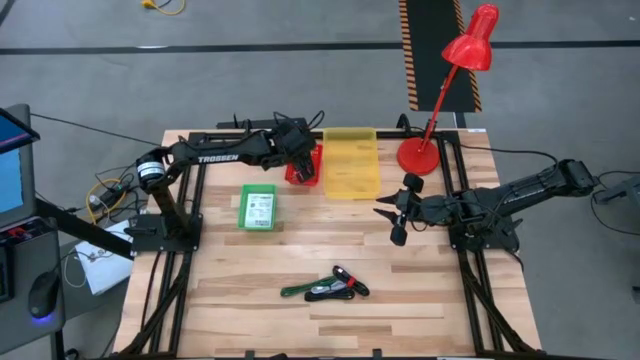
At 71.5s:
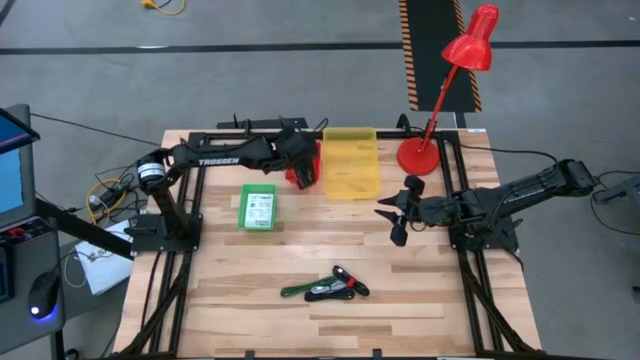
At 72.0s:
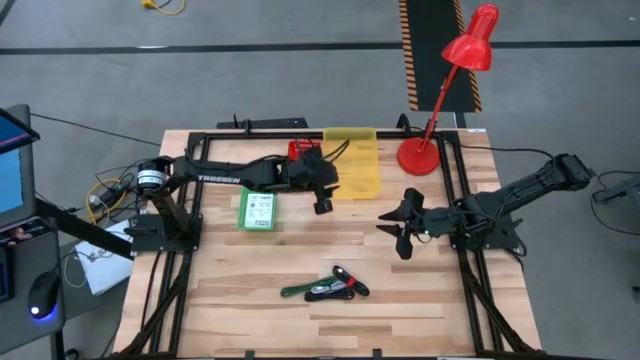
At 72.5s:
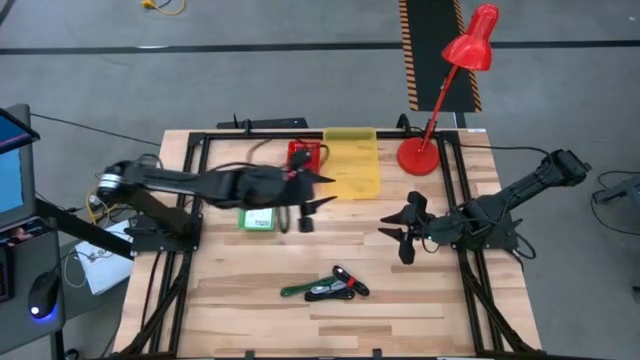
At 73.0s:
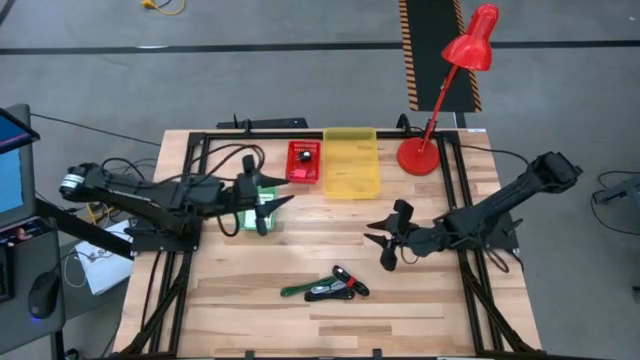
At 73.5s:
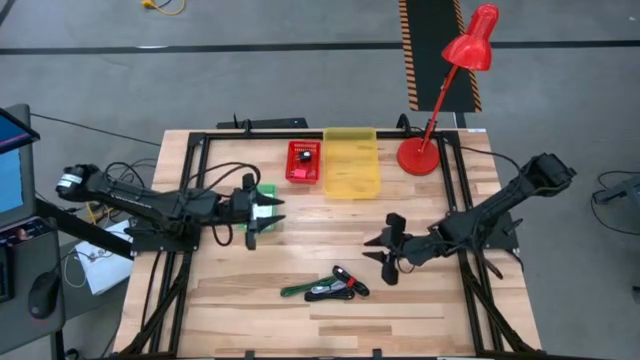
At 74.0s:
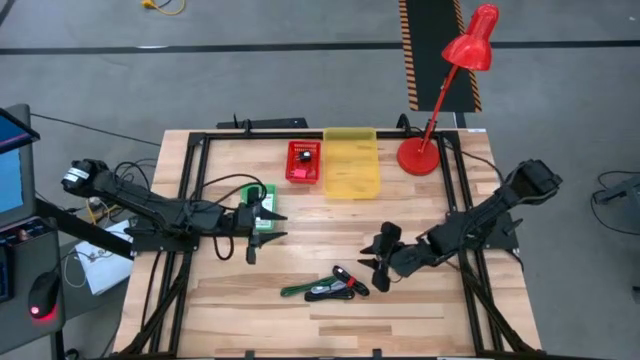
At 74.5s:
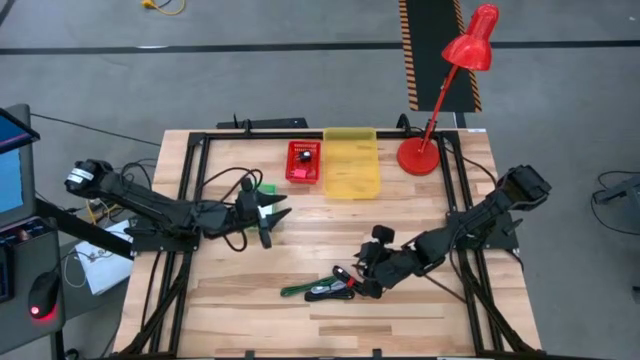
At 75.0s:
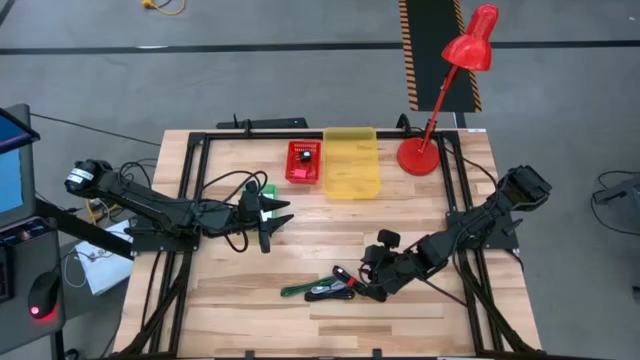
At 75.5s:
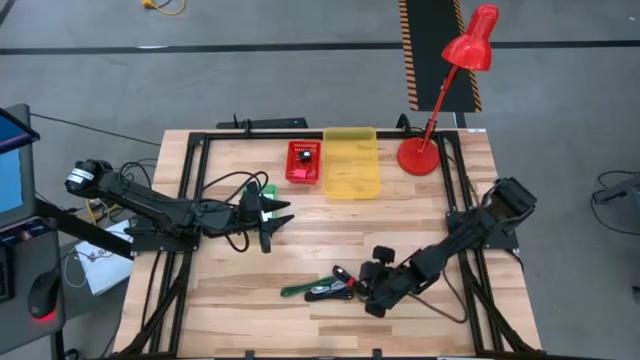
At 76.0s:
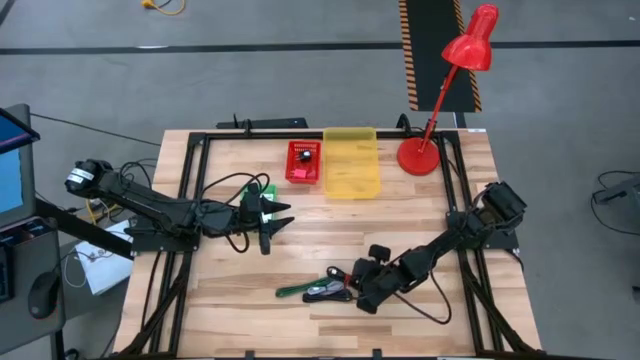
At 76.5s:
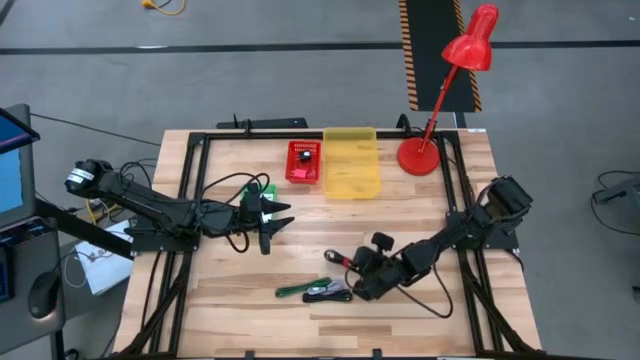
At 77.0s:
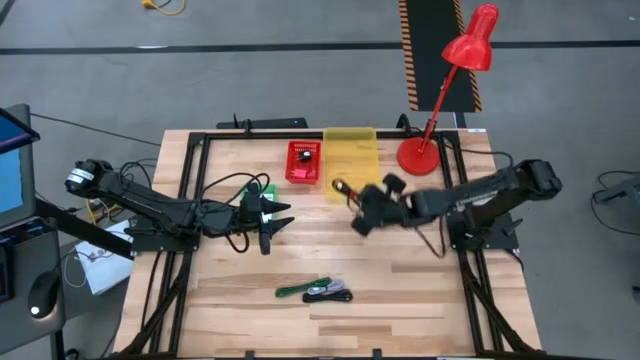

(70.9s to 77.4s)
Task: Pick and place items into bin
Put the top black charger cable into the yellow bin

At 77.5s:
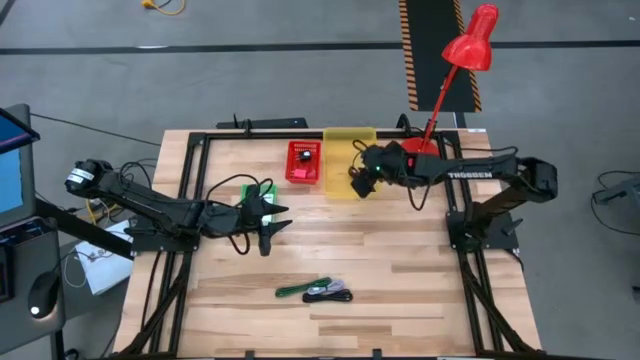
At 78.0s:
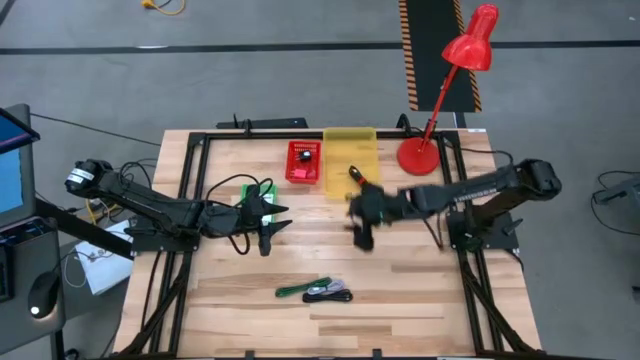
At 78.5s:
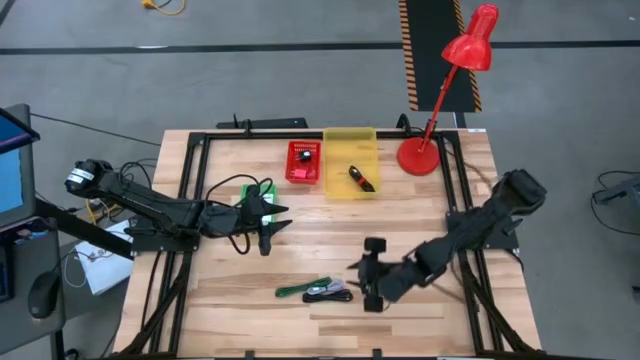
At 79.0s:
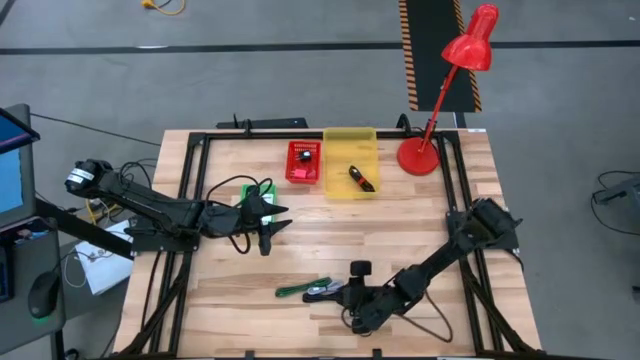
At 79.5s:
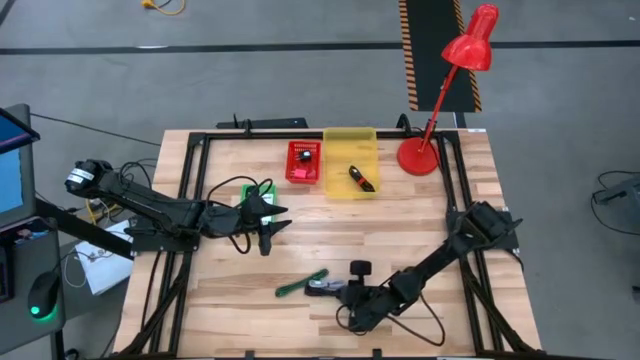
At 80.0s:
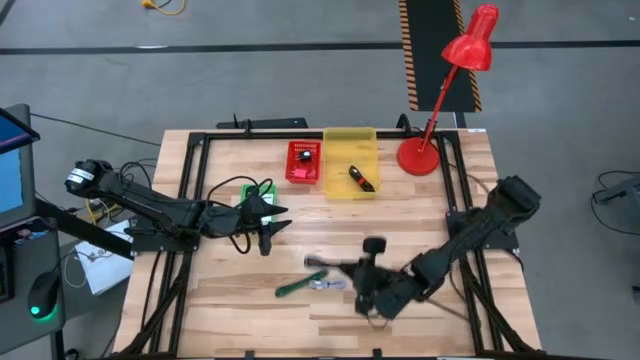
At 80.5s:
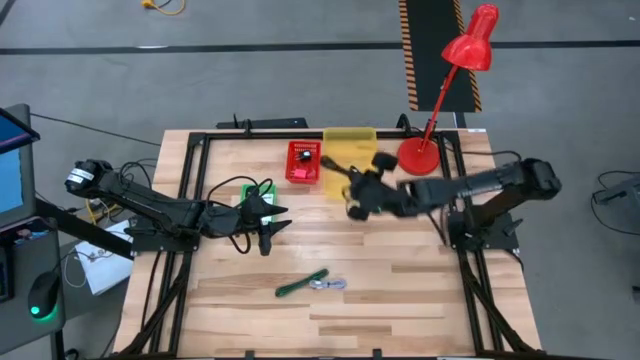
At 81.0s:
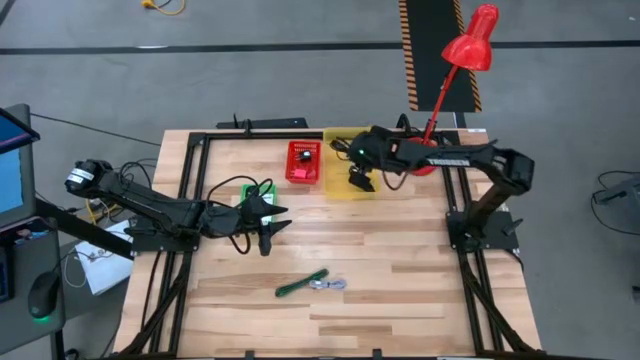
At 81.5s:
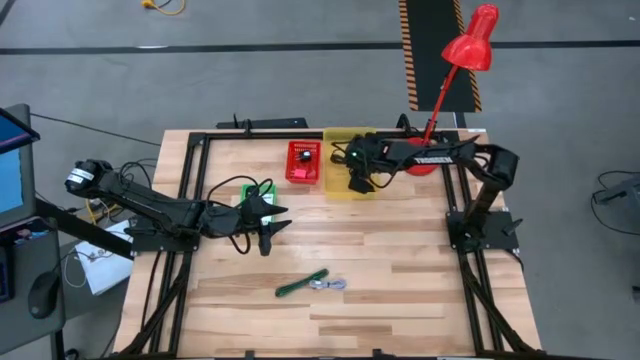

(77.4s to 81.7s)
Put the black charger cable into the yellow bin

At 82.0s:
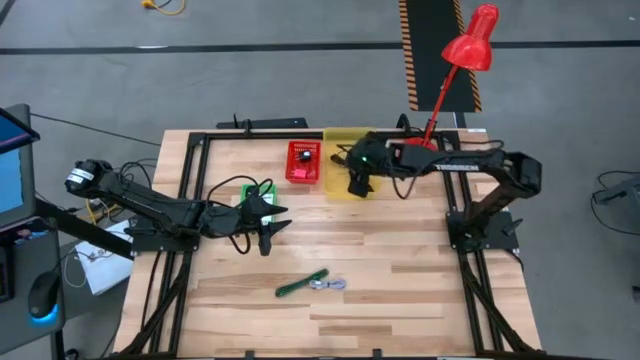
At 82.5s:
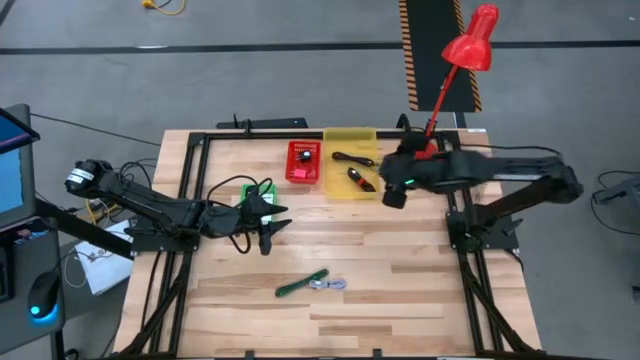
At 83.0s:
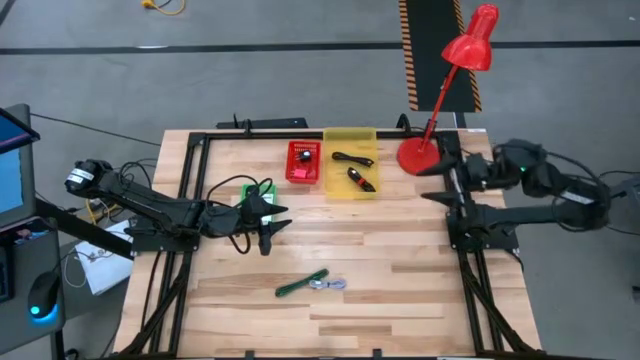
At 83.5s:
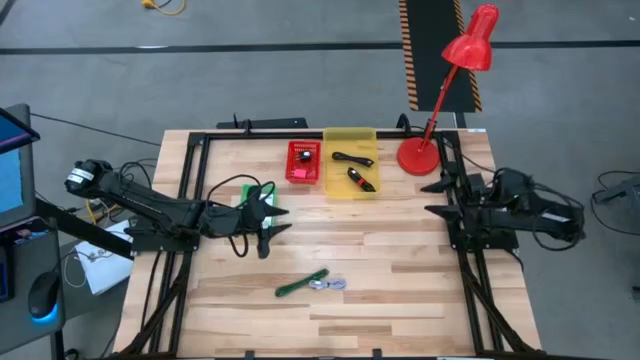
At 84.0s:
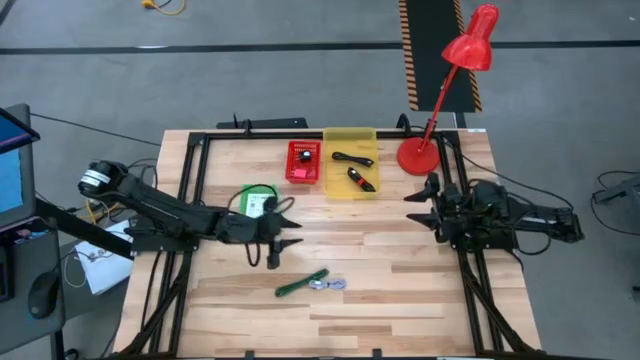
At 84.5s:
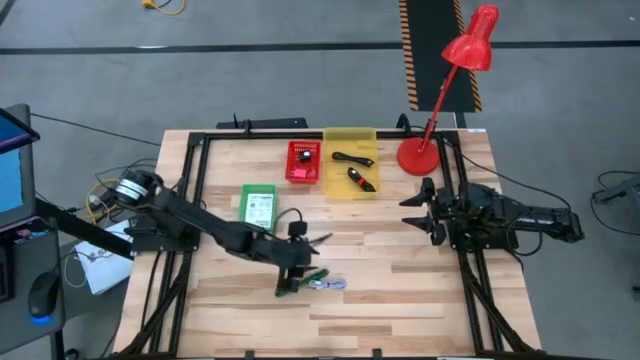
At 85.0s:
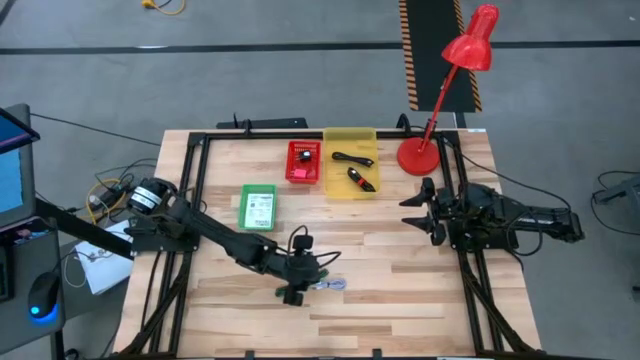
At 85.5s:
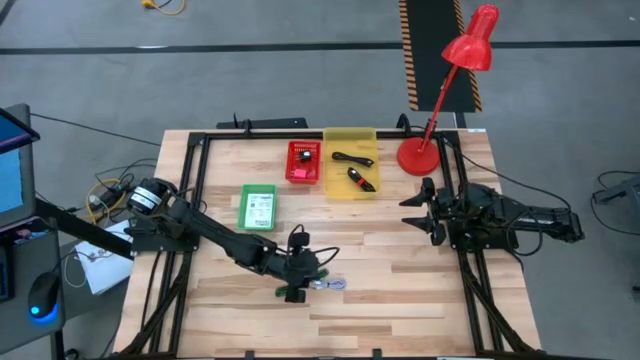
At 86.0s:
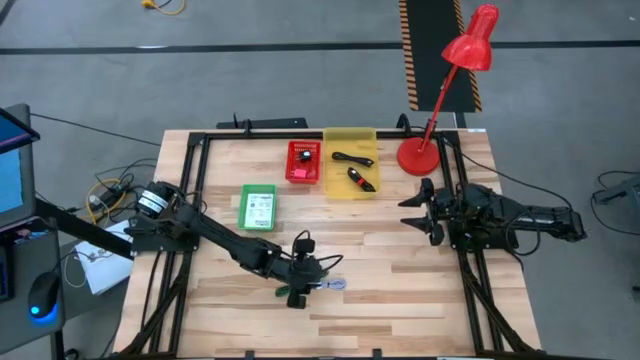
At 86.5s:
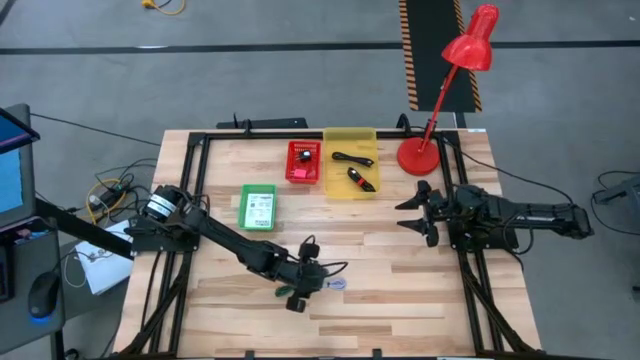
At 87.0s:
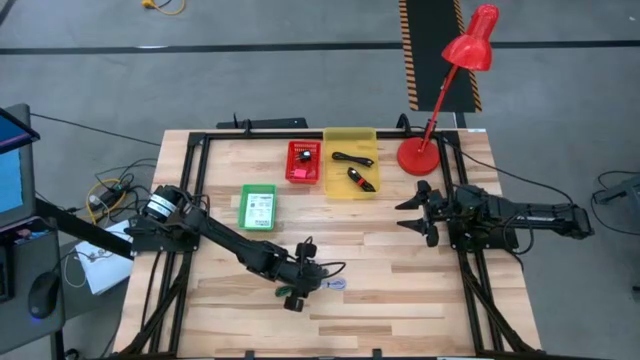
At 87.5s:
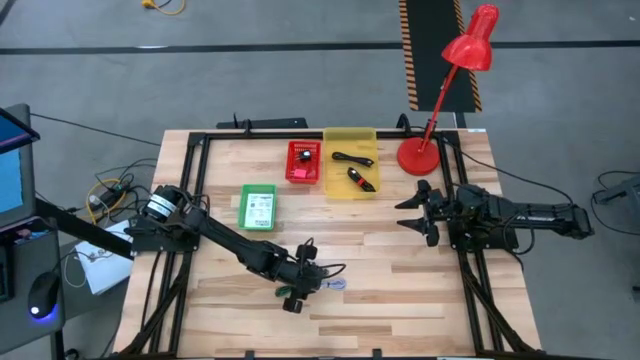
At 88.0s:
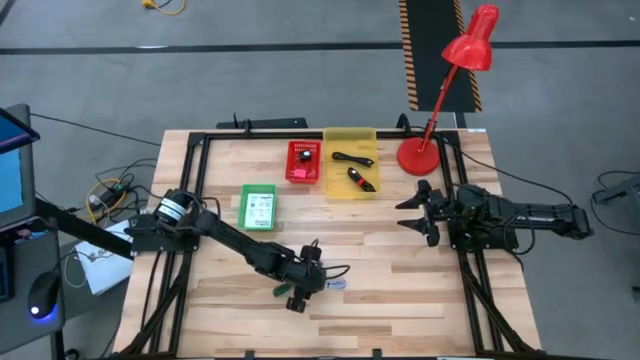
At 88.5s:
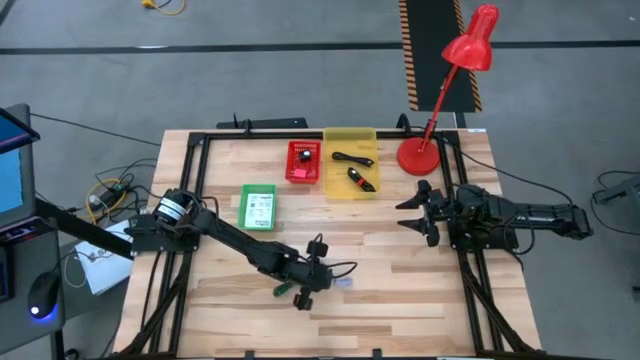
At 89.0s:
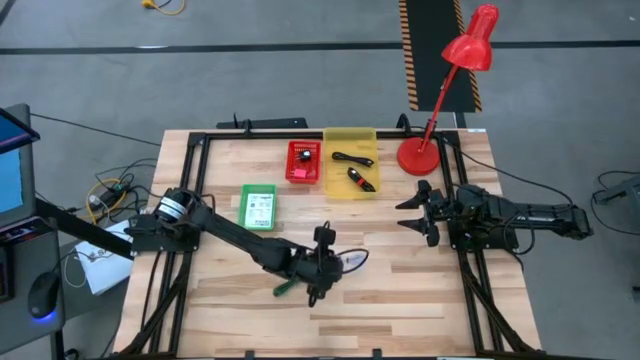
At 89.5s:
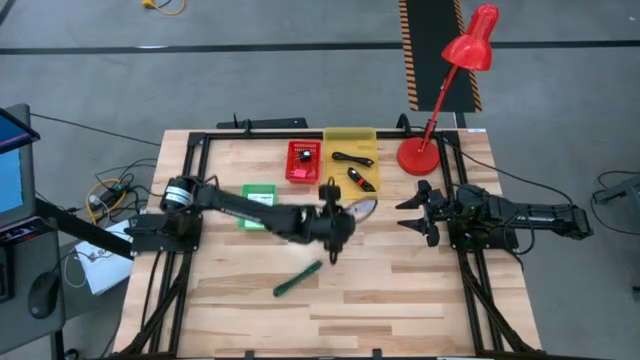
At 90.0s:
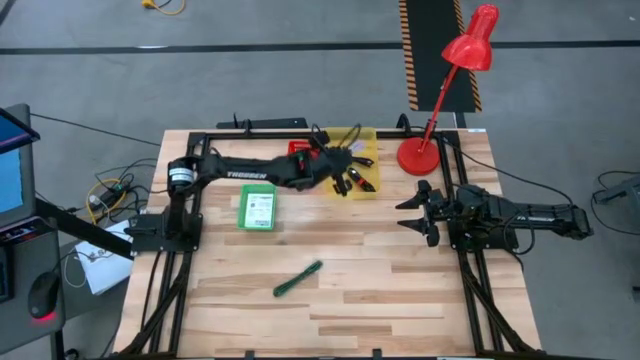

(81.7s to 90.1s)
Put the white charger cable into the yellow bin

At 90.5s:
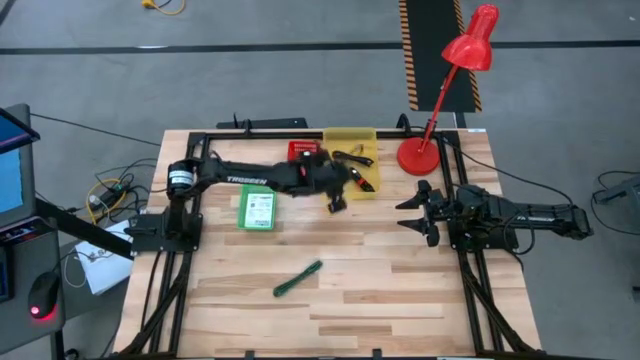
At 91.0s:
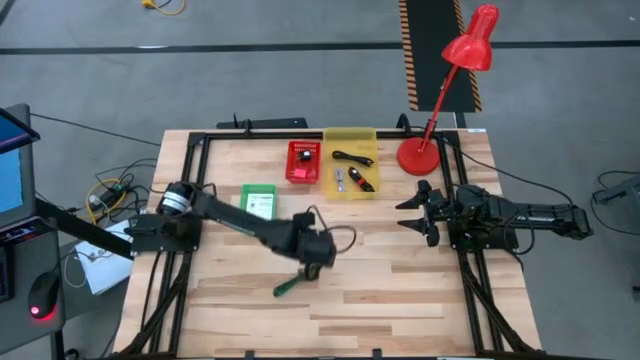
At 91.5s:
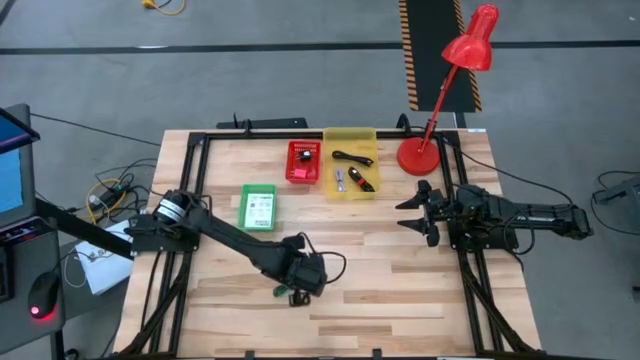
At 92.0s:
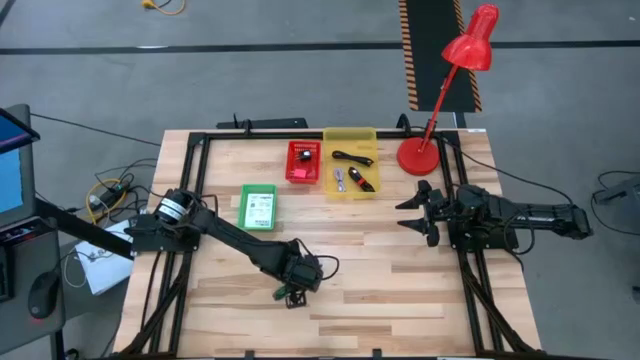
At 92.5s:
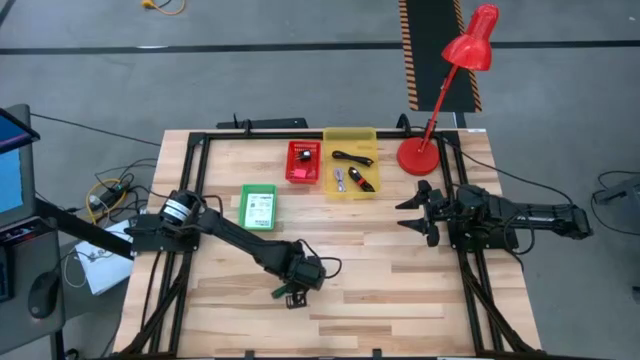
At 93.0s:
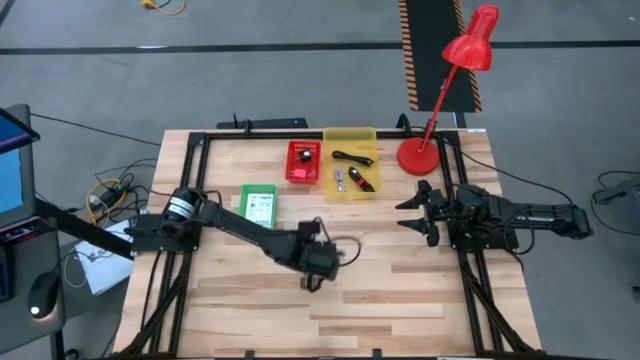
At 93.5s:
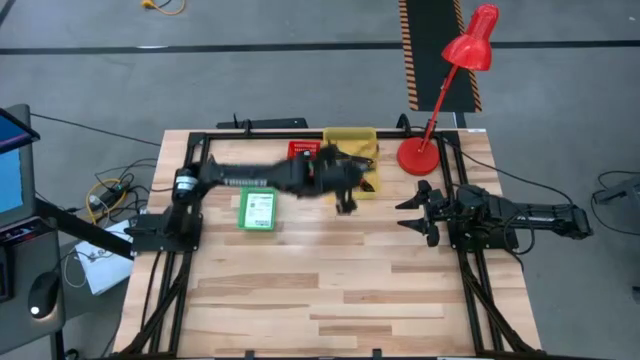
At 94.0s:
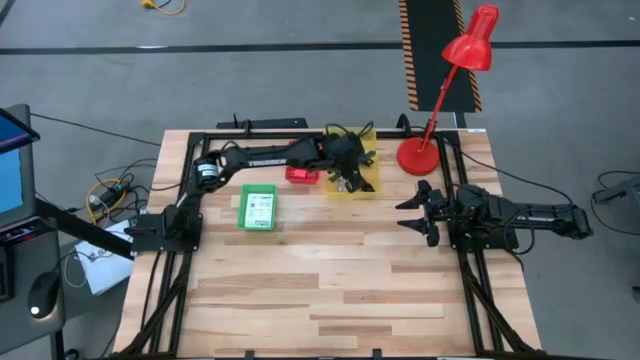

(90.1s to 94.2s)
Put the green charger cable into the yellow bin
